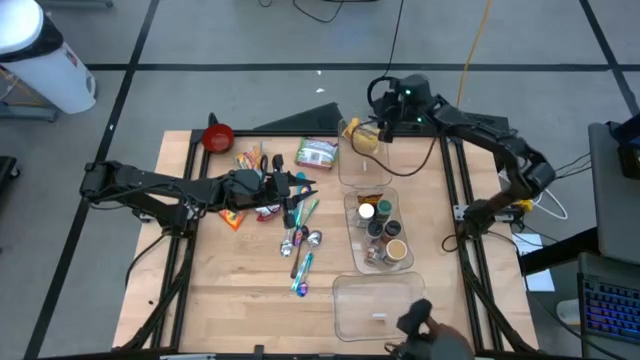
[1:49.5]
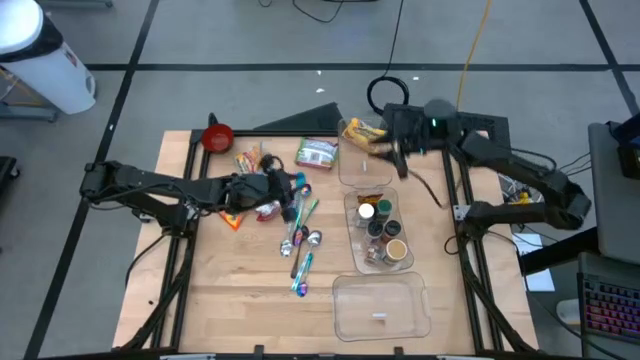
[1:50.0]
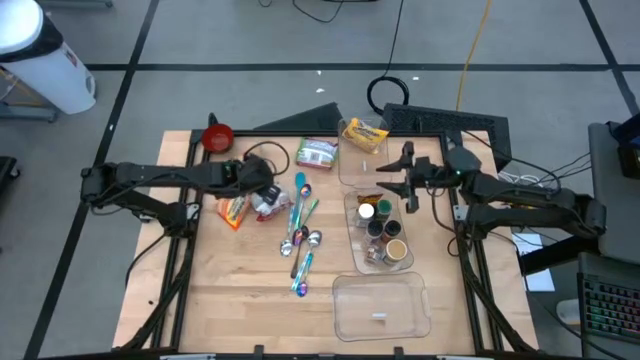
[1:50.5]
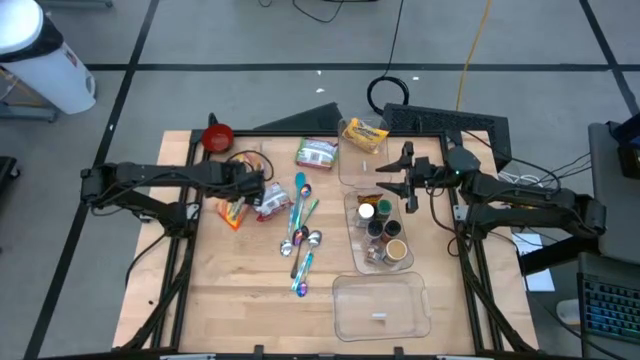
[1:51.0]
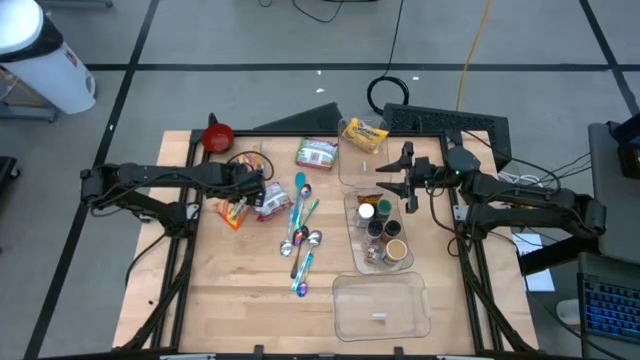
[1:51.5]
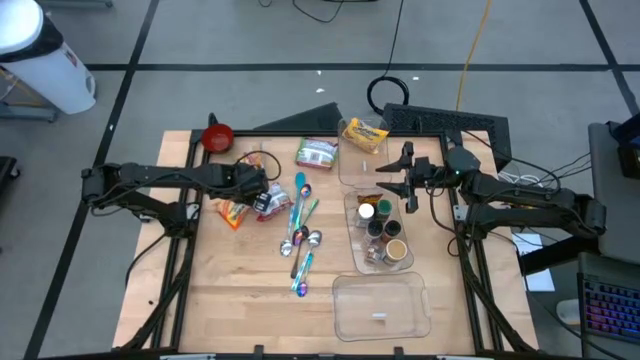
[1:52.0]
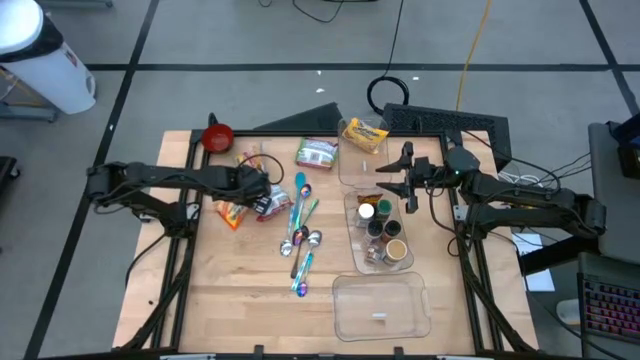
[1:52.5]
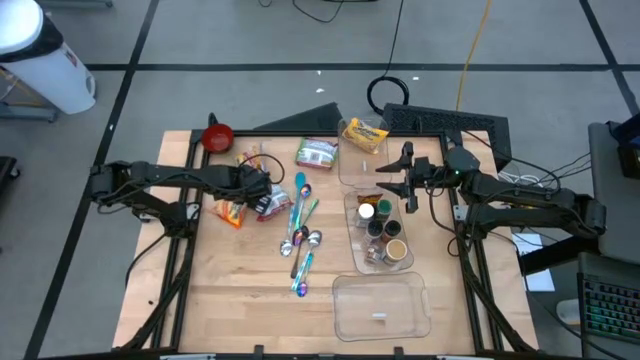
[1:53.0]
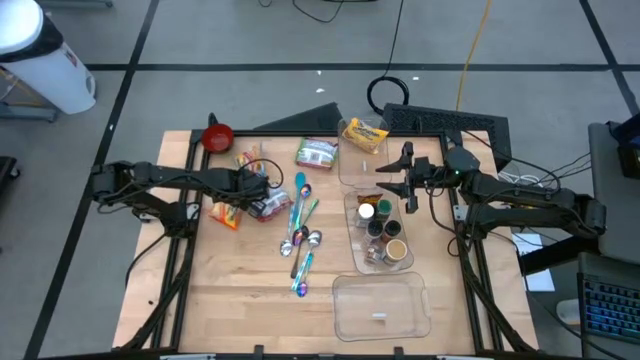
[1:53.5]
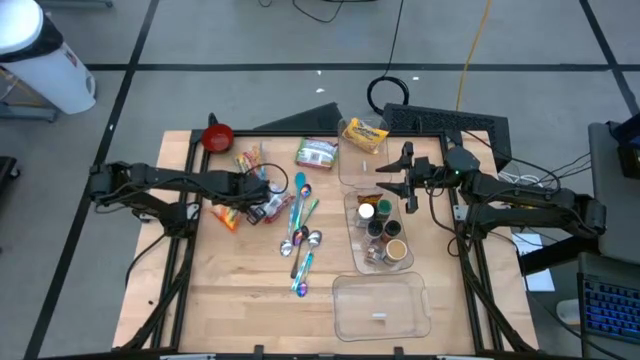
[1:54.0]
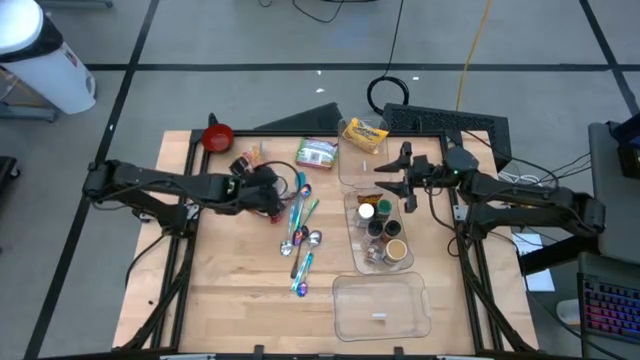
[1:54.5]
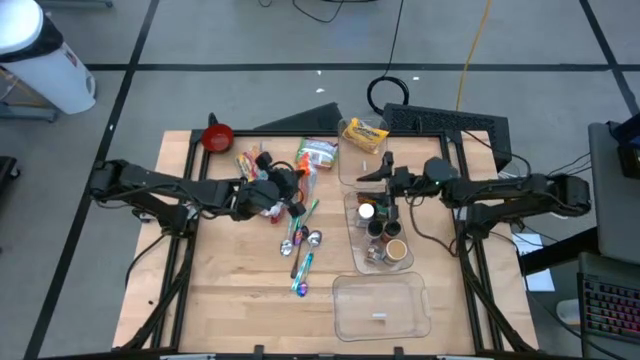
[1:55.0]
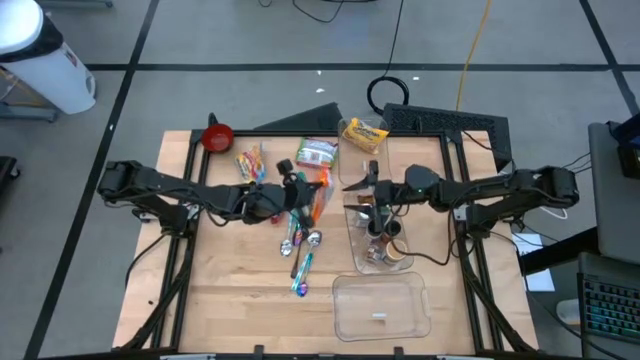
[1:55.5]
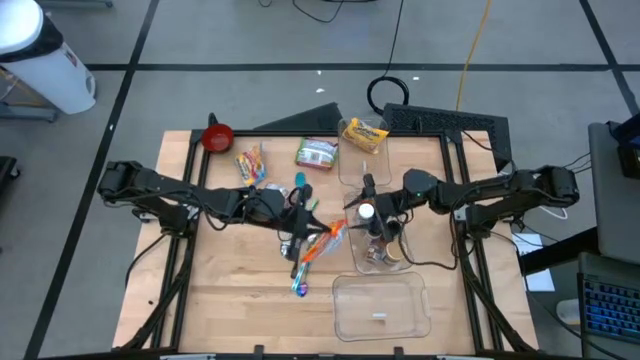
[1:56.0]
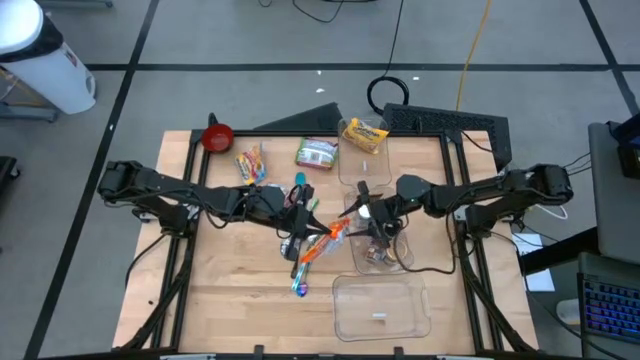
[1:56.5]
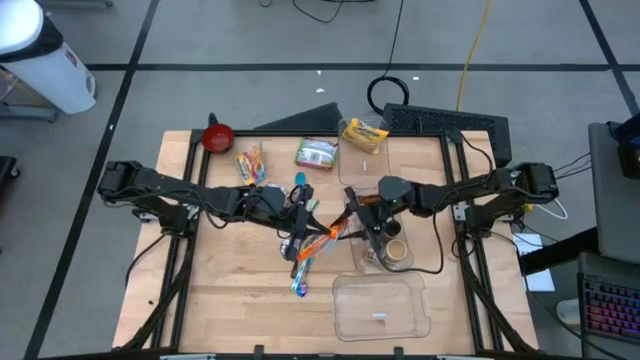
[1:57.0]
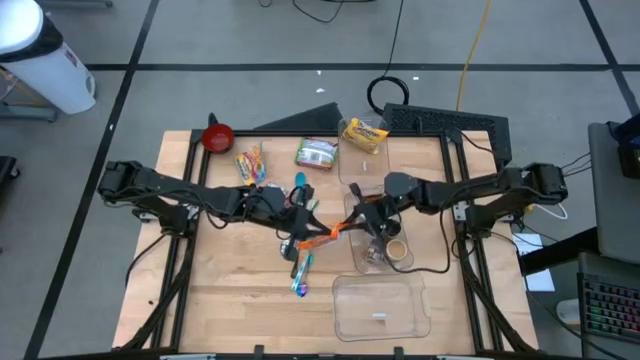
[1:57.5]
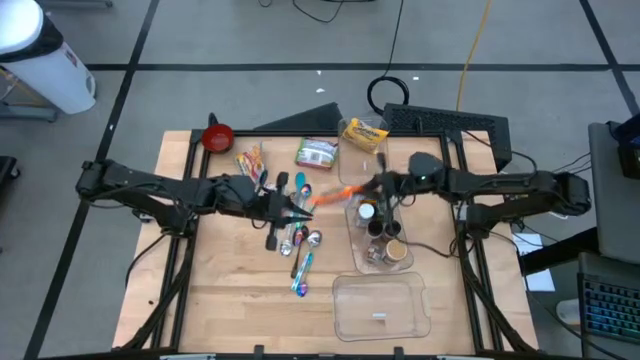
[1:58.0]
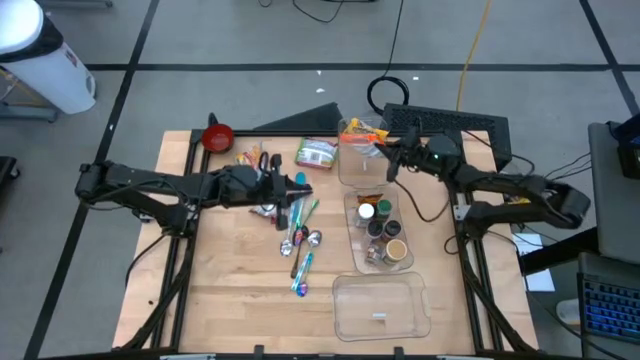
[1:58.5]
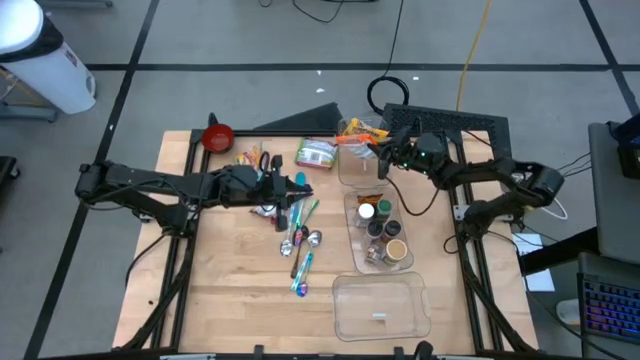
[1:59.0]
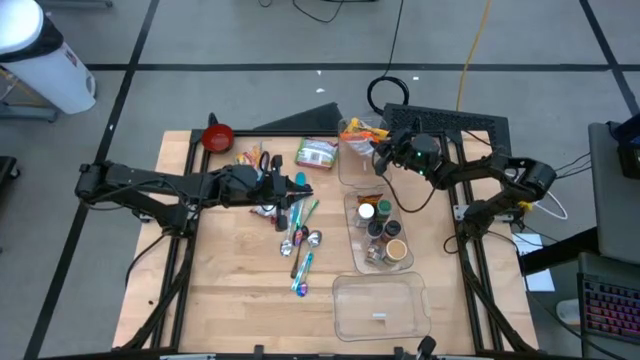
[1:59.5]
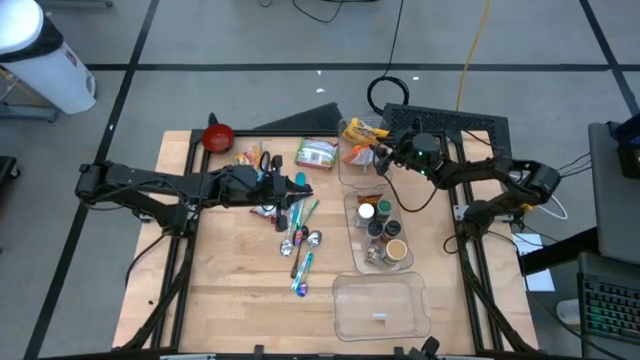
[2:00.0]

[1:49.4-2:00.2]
Task: Pick & Place Food Item
Put the orange noodle pack into the top transparent bin

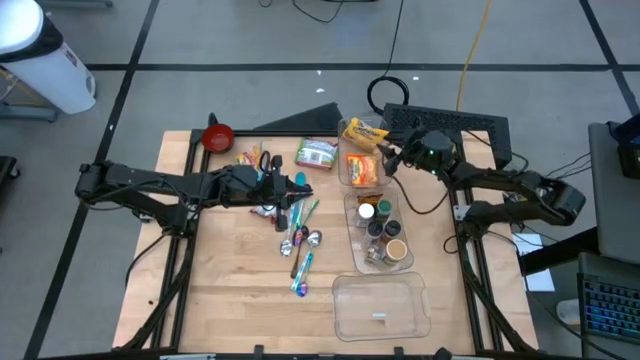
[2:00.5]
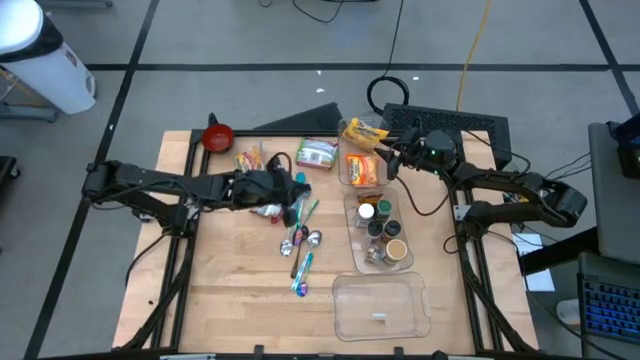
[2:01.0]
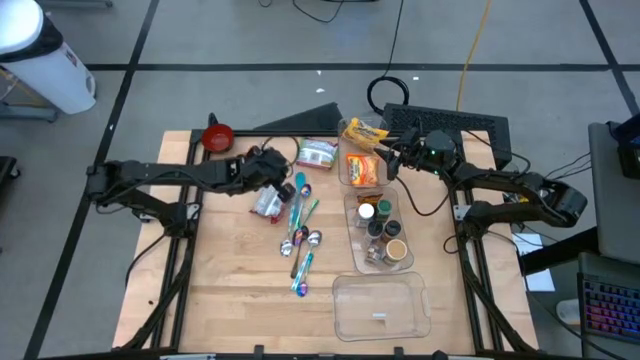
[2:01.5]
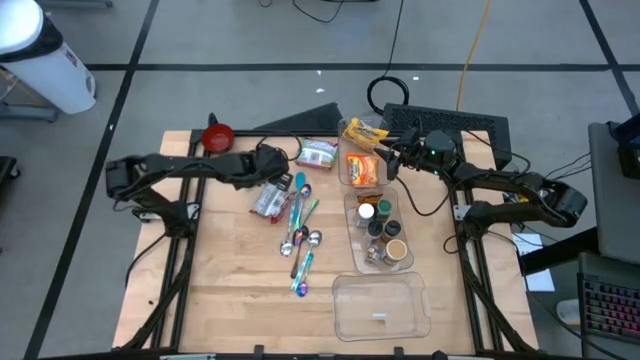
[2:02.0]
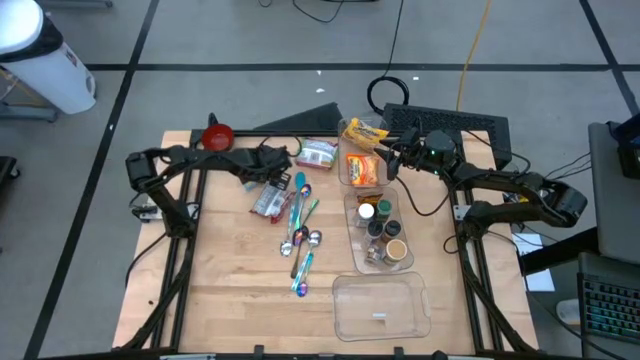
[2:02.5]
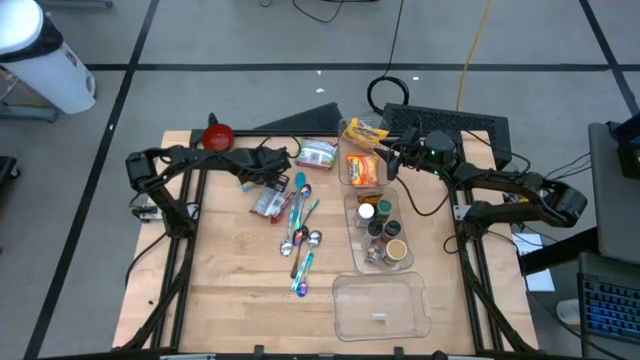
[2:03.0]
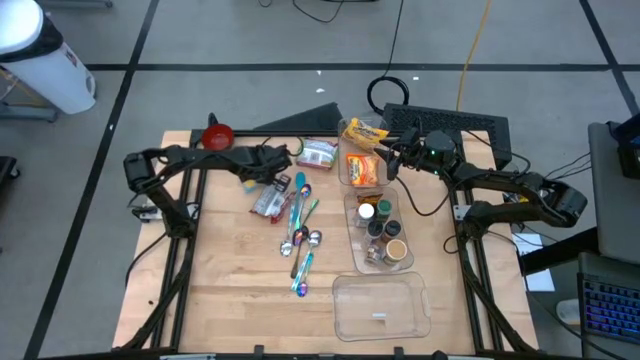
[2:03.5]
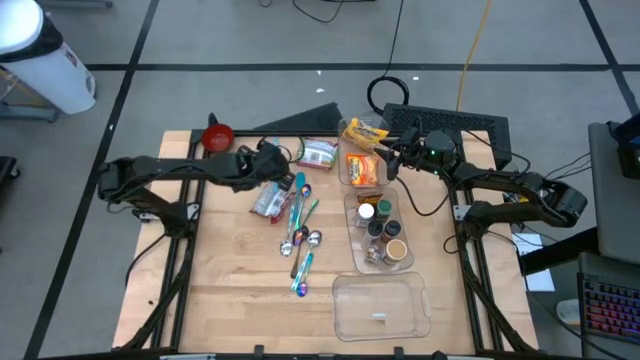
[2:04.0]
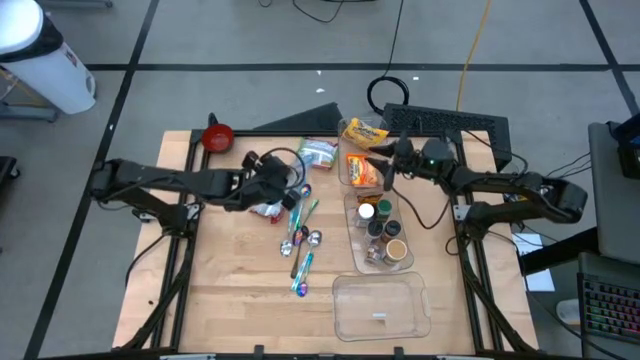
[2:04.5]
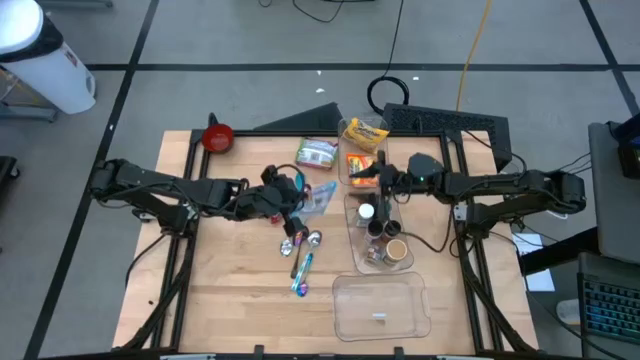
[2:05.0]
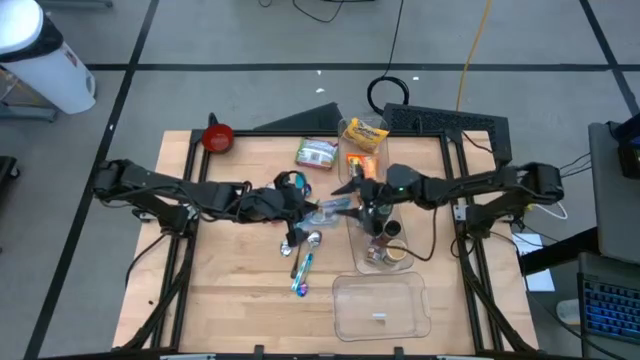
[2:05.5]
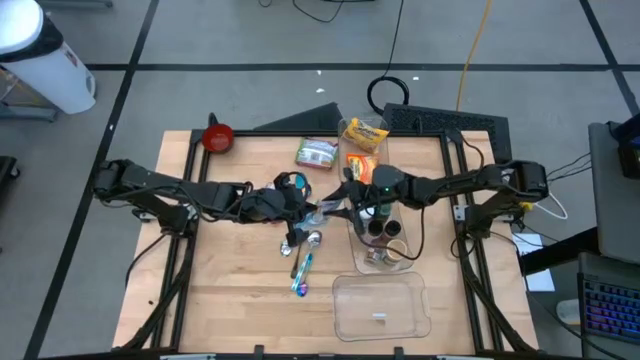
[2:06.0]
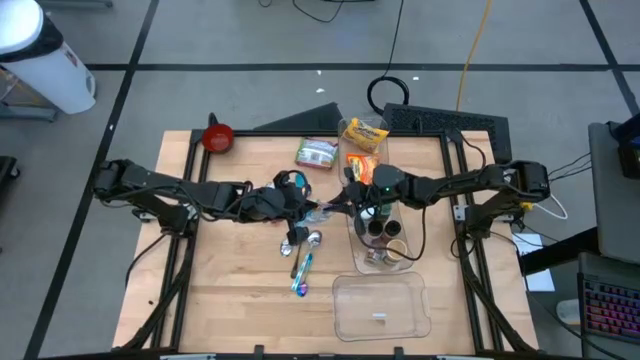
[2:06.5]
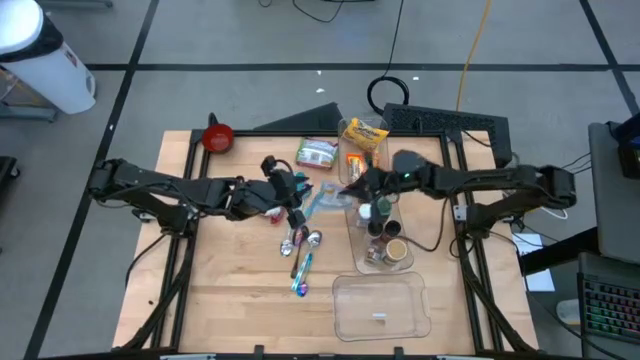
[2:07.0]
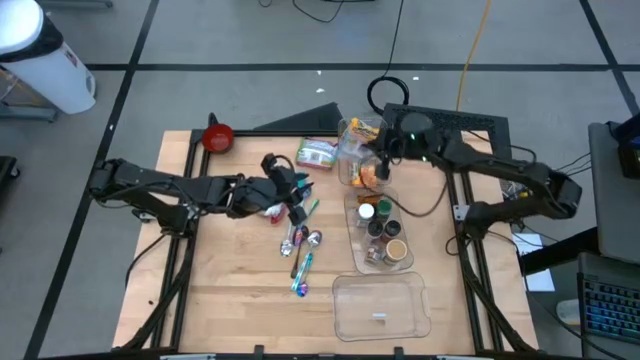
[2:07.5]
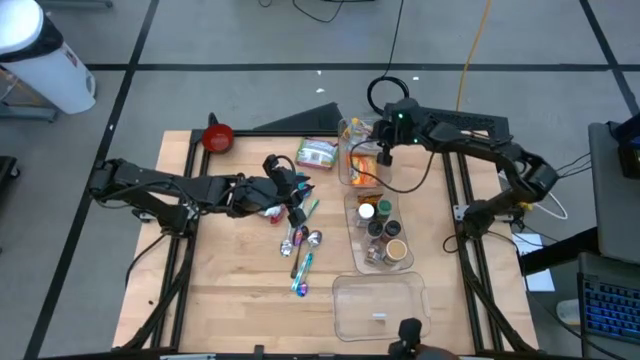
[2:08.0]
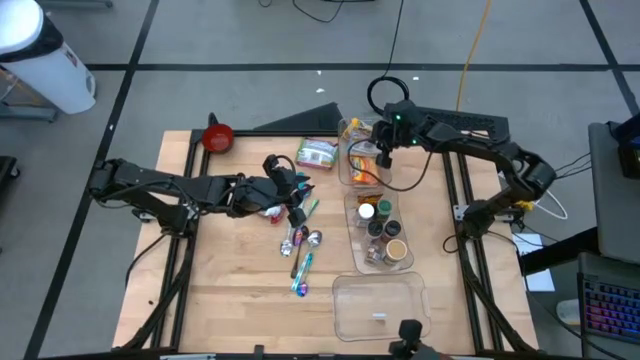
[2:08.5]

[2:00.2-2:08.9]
Put the blue noodle pack into the top transparent bin
